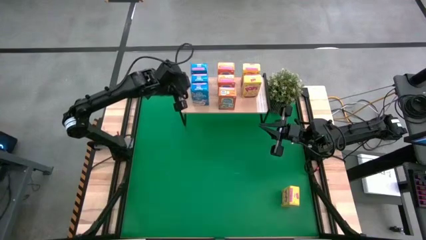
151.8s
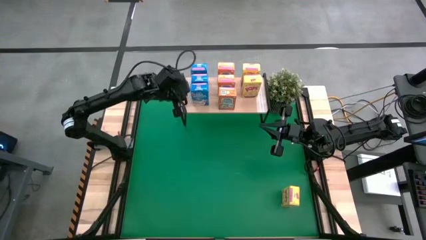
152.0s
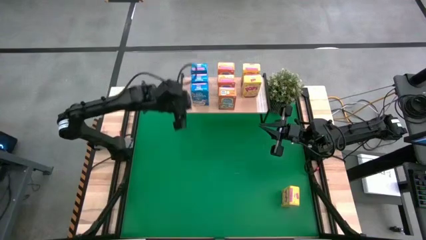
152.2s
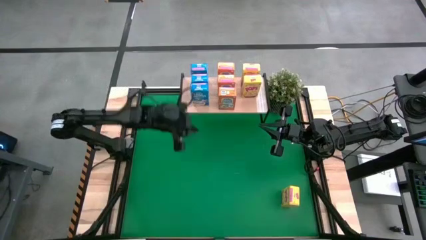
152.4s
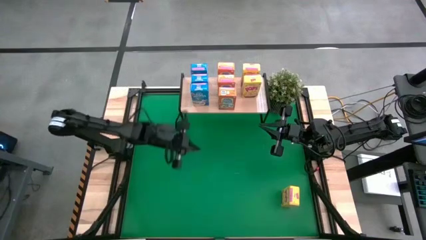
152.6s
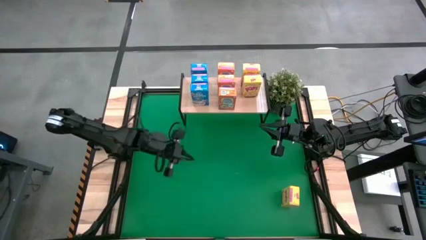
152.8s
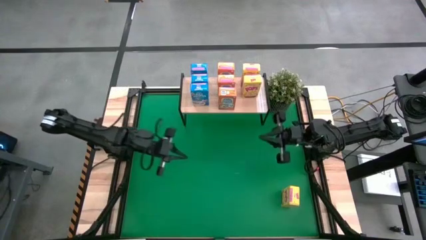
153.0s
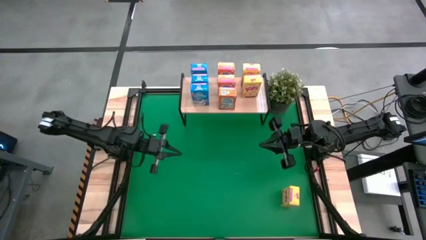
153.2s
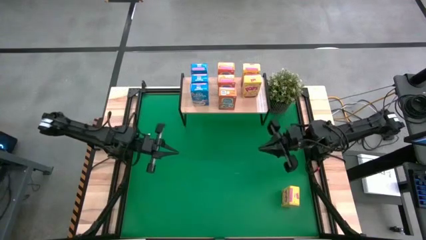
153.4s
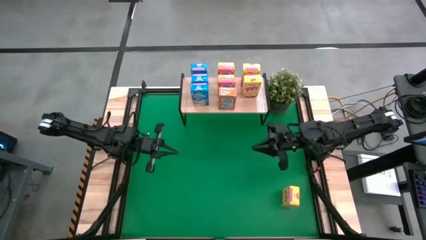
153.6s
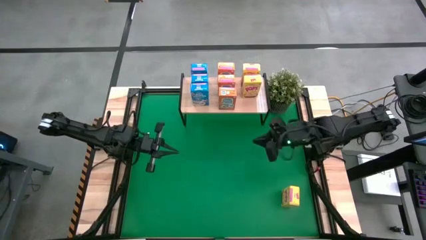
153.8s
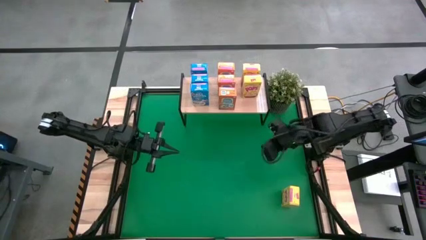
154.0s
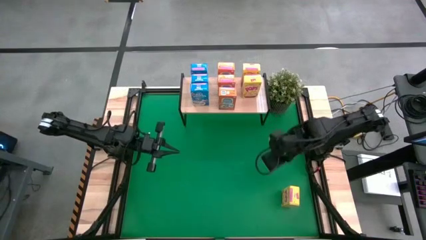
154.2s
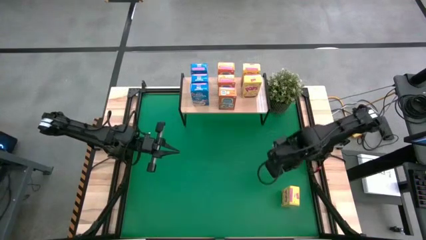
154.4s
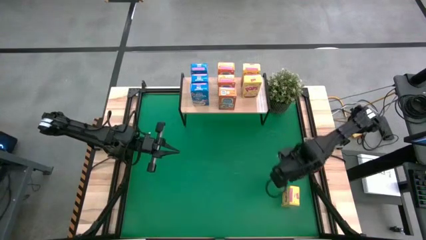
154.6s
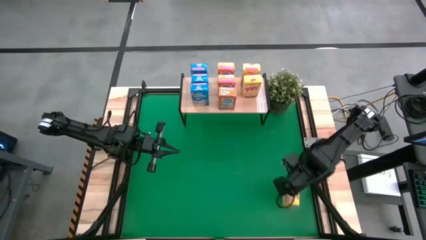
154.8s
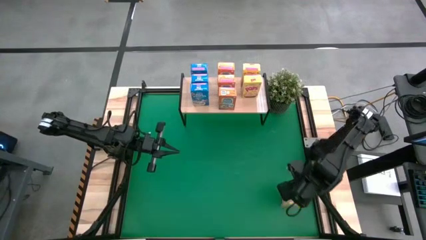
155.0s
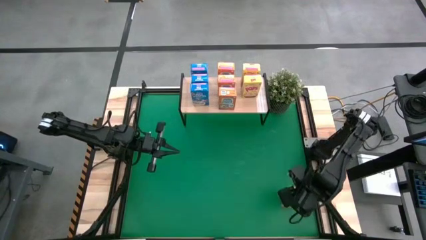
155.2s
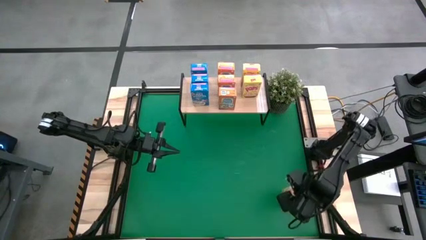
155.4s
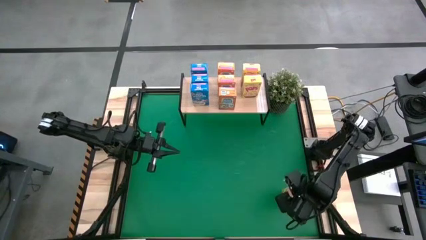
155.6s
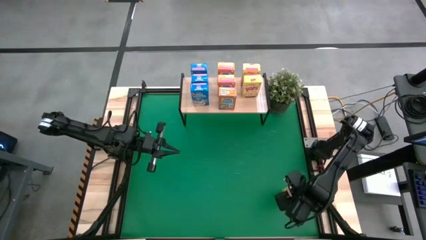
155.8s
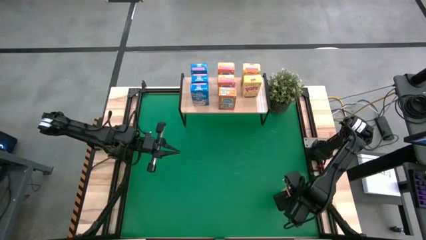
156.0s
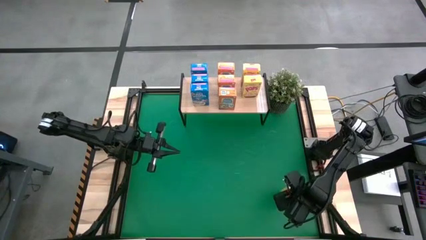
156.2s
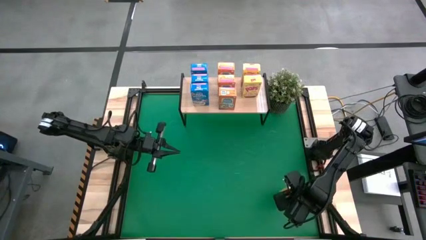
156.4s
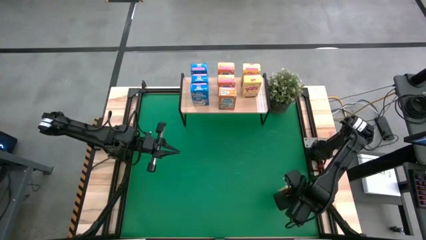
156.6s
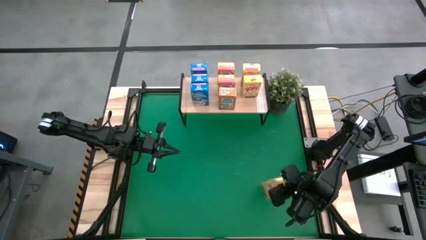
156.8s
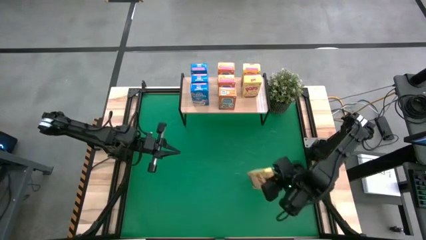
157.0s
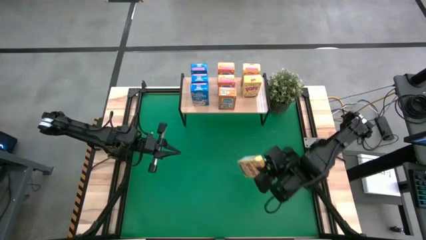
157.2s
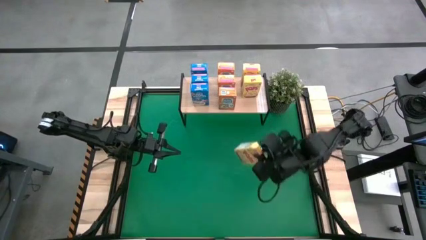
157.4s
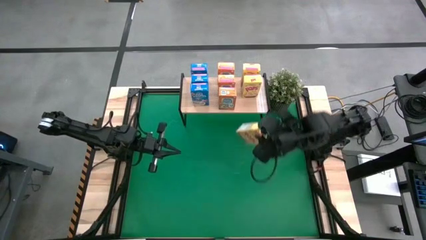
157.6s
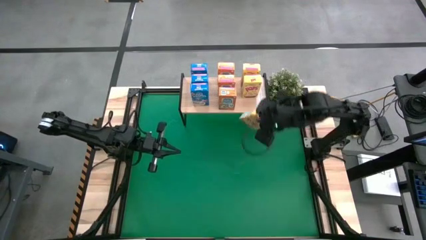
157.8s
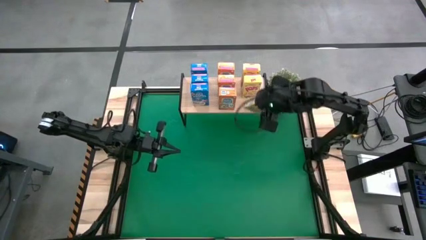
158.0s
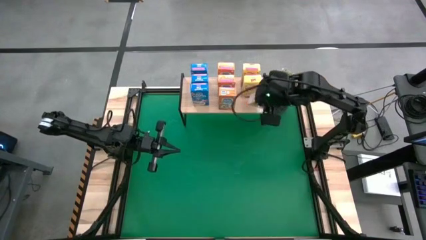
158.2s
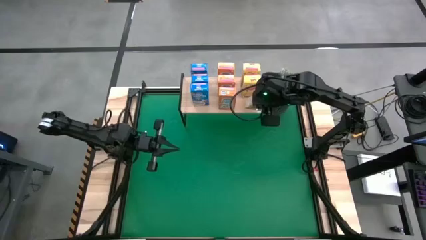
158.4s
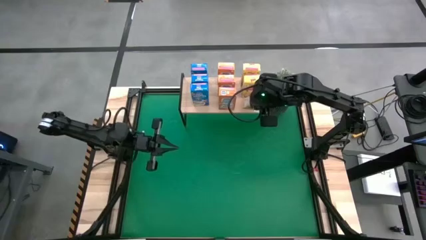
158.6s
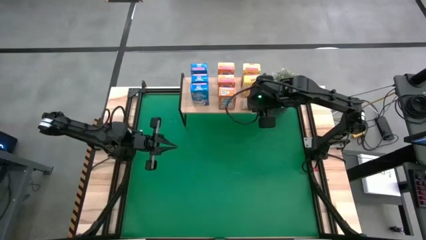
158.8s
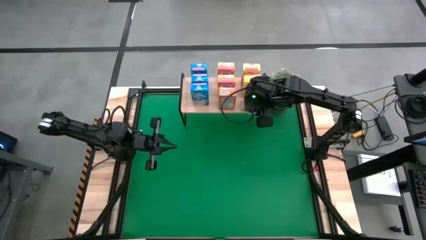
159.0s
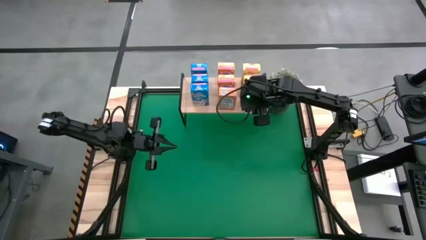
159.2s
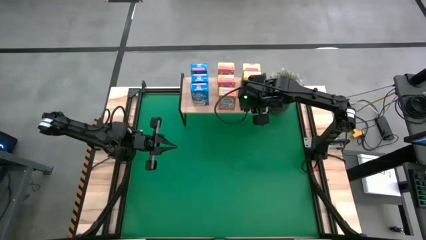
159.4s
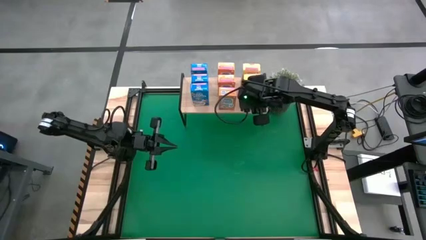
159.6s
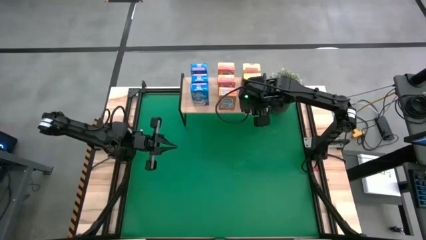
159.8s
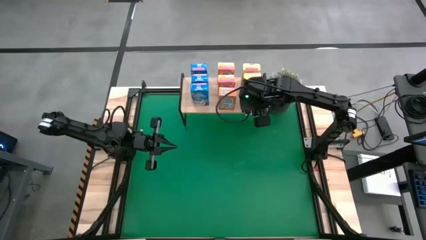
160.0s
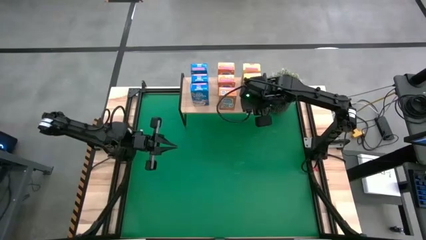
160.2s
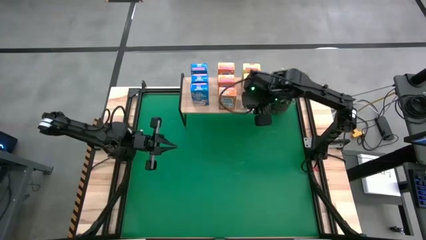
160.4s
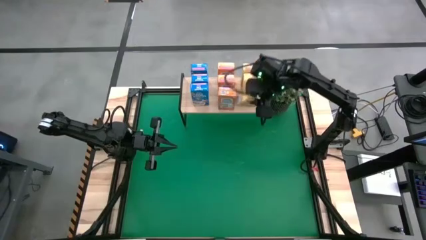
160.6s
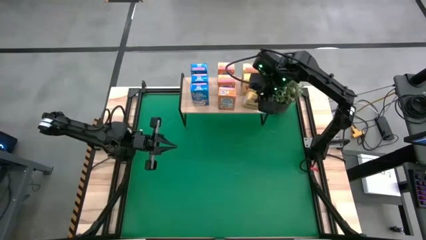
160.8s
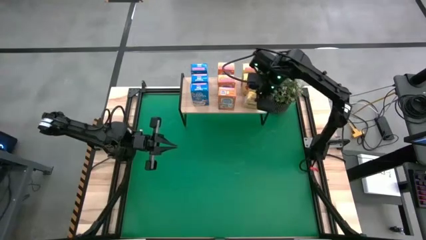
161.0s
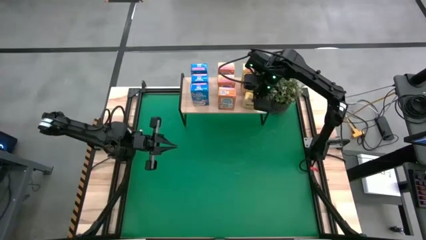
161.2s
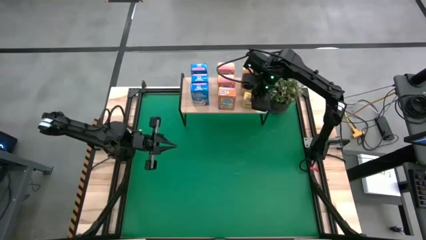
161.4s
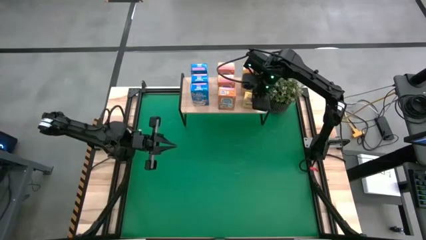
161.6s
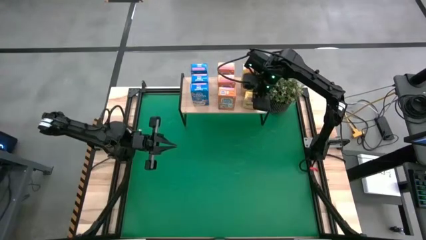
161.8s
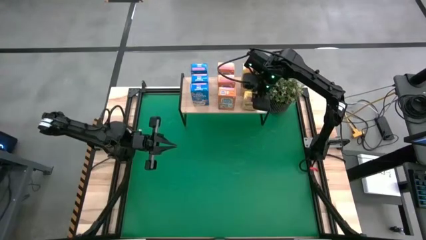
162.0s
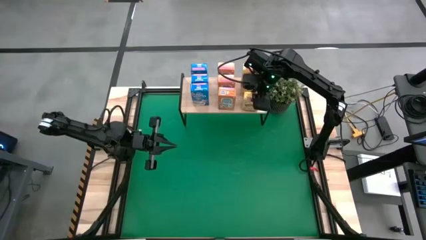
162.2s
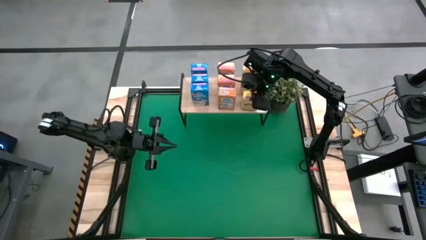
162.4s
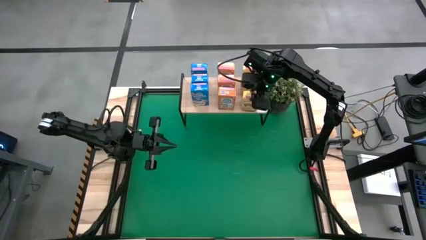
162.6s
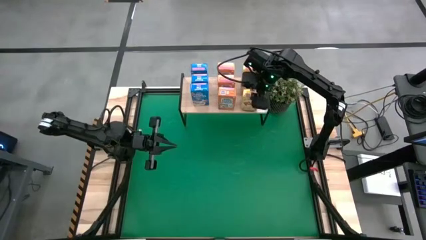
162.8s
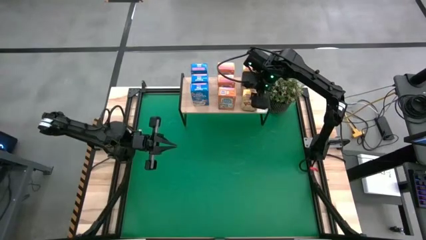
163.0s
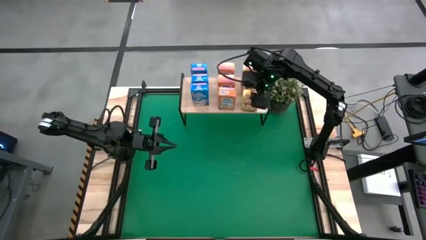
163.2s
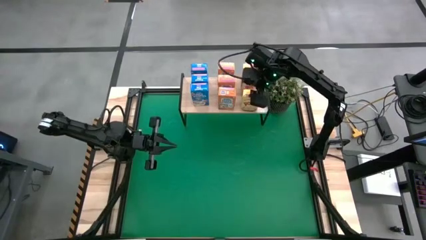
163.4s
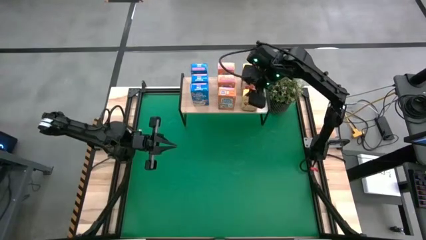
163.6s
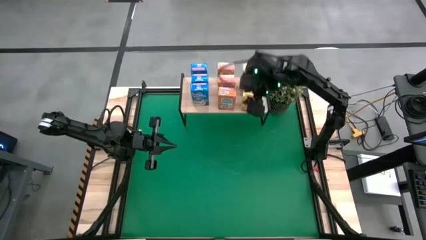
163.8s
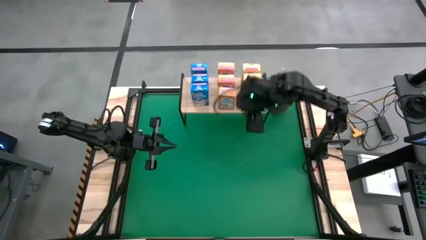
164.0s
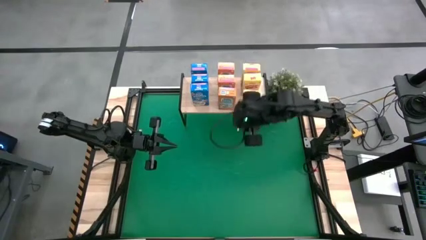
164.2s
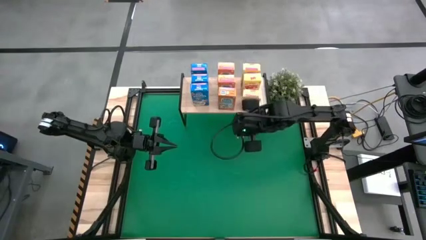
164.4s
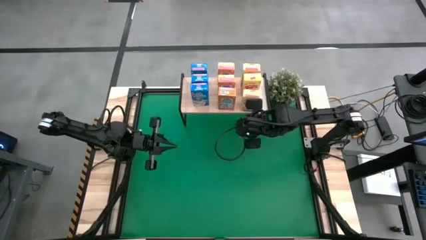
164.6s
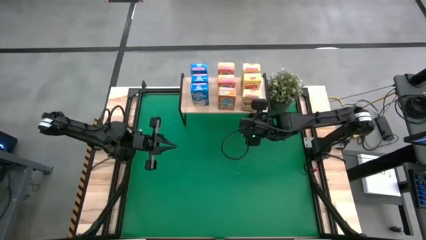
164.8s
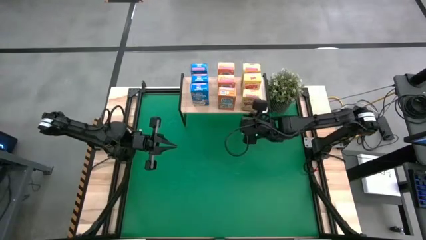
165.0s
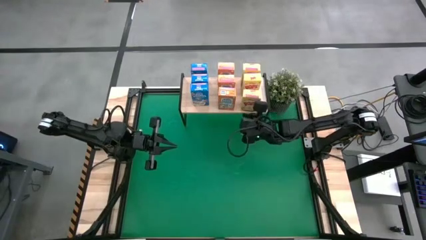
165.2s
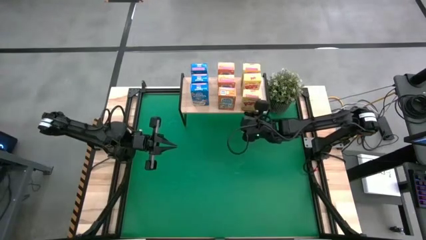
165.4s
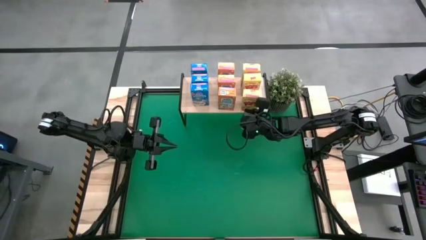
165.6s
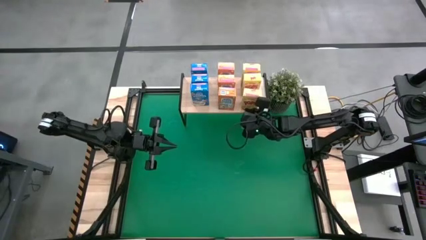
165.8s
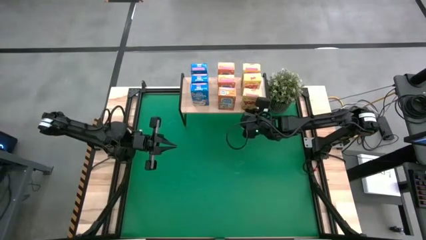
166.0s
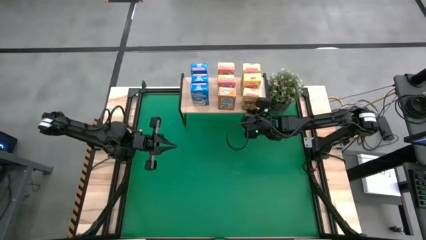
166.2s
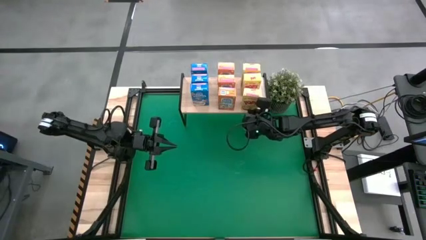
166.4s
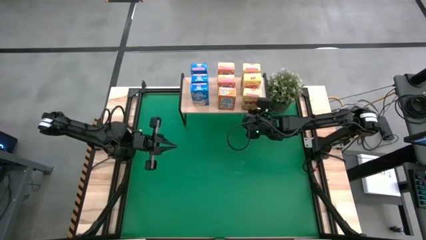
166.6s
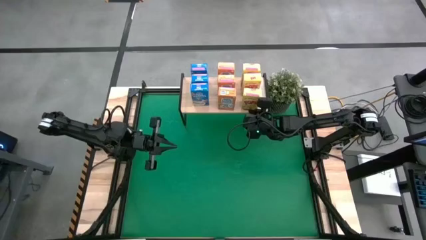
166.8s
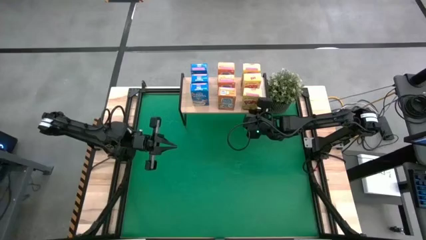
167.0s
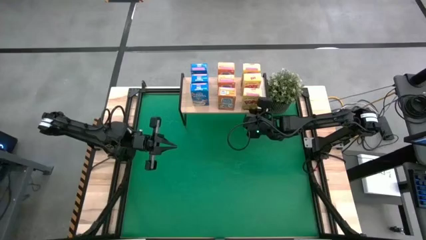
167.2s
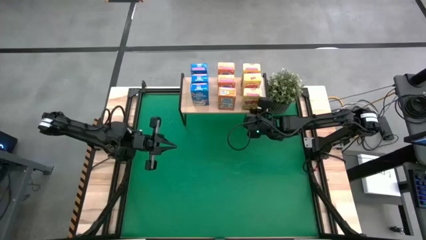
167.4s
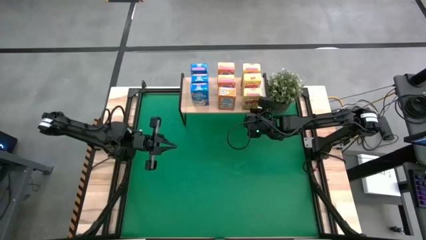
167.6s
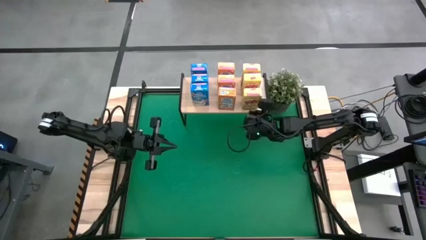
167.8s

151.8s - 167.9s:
Task: Stack cereal on shelf
Put the yellow cereal box on the shelf

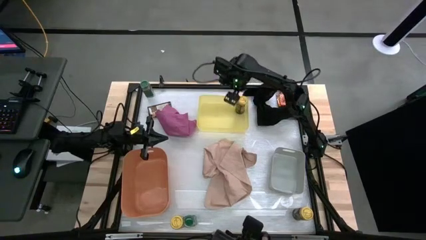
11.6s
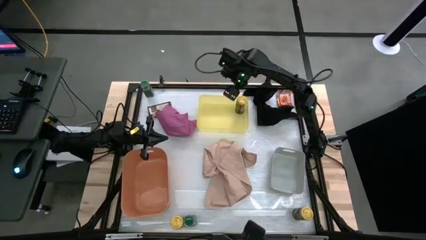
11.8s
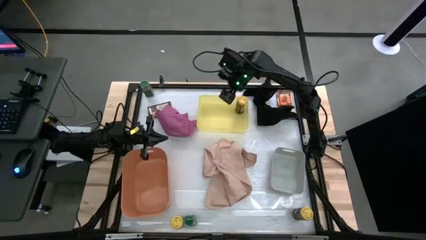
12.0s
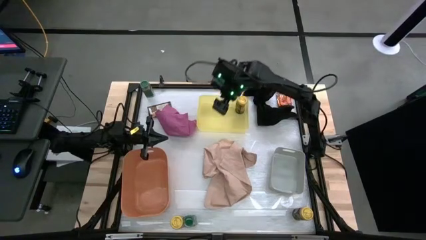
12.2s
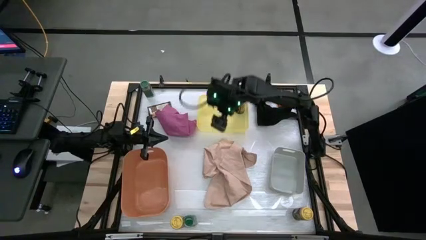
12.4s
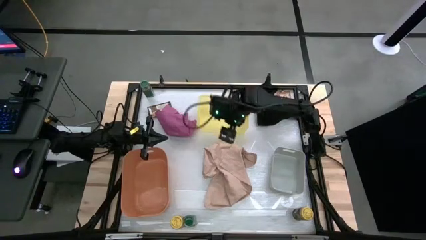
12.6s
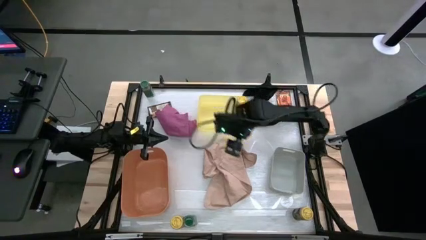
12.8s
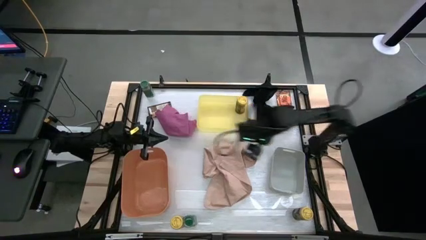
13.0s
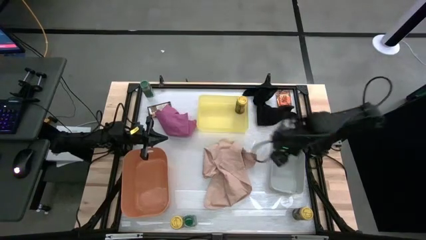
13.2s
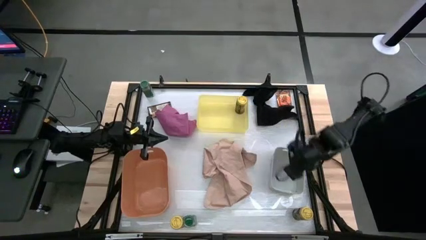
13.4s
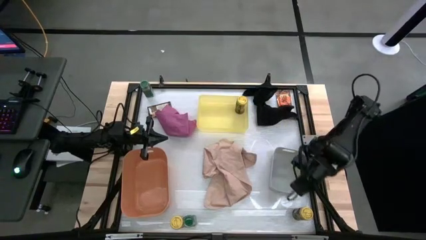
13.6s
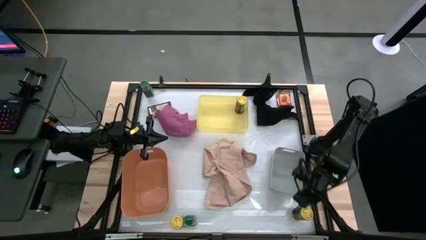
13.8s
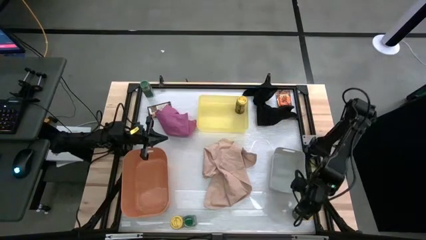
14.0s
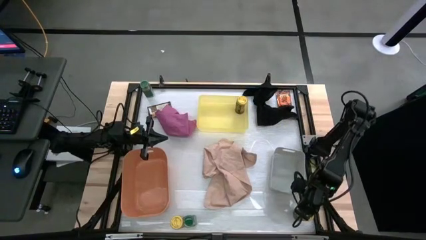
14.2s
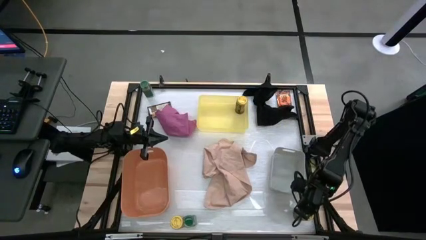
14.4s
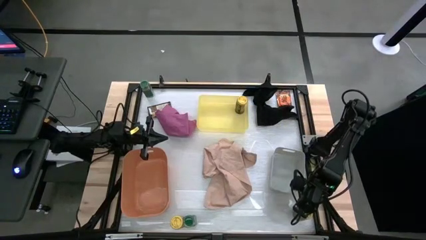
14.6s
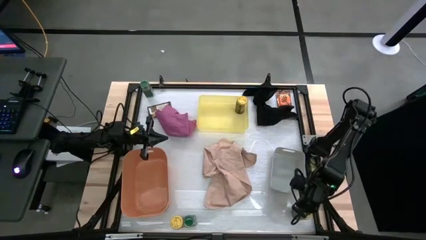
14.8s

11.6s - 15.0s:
Task: Sort spices by type
Put the right yellow seasoning bottle into the yellow bin
